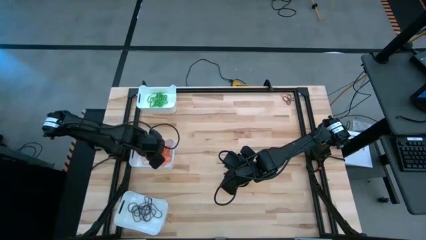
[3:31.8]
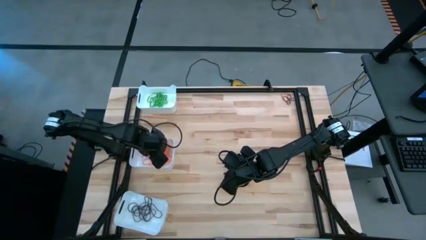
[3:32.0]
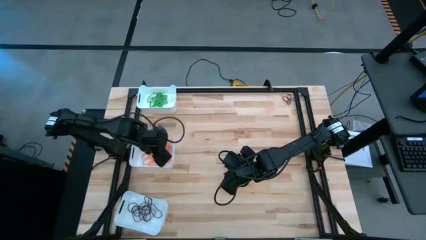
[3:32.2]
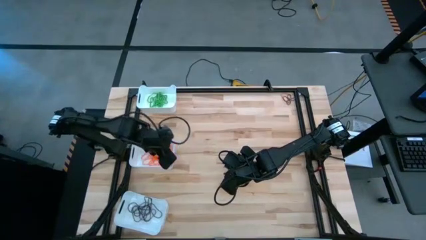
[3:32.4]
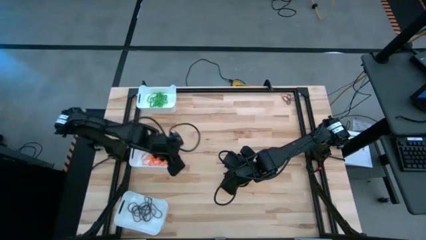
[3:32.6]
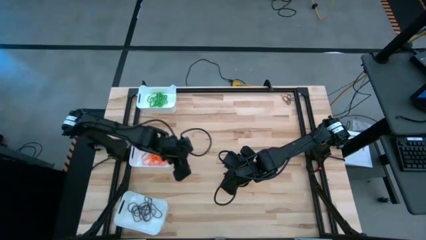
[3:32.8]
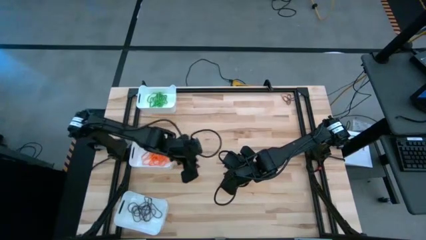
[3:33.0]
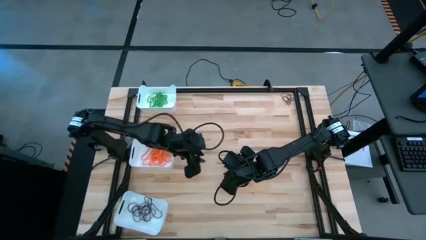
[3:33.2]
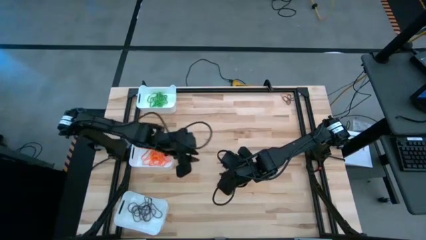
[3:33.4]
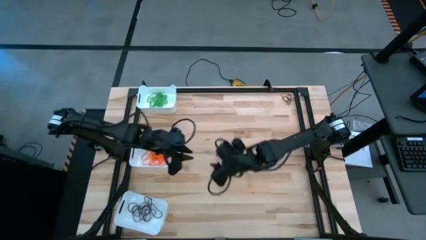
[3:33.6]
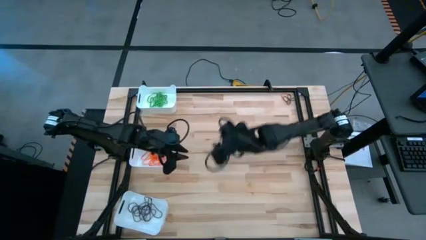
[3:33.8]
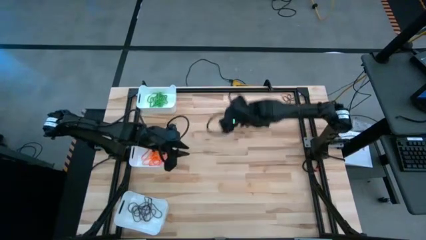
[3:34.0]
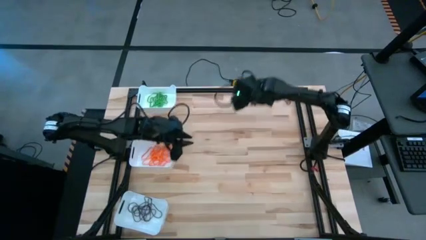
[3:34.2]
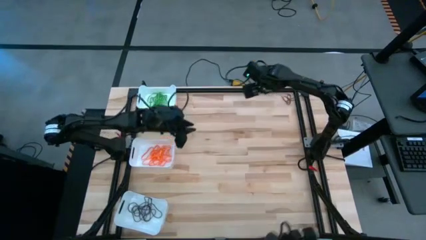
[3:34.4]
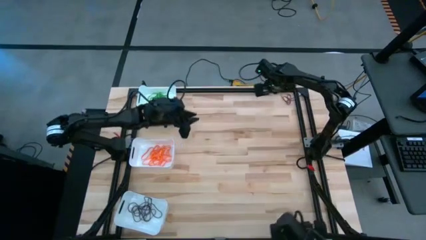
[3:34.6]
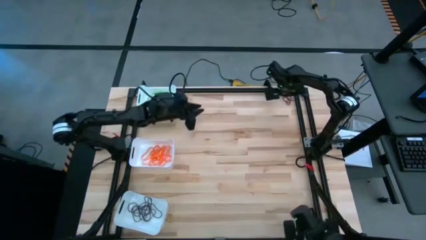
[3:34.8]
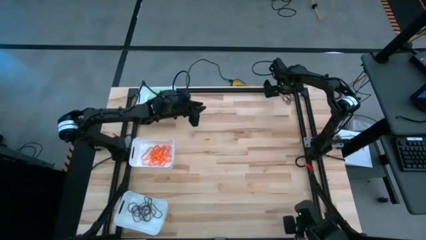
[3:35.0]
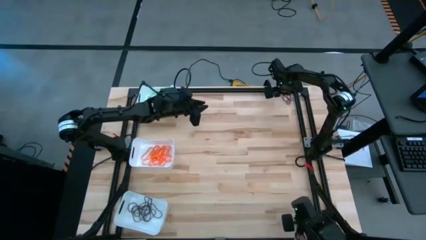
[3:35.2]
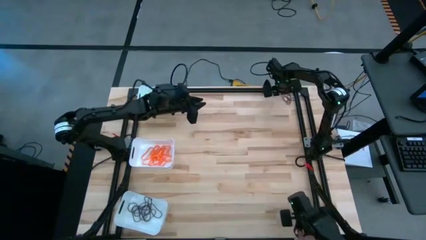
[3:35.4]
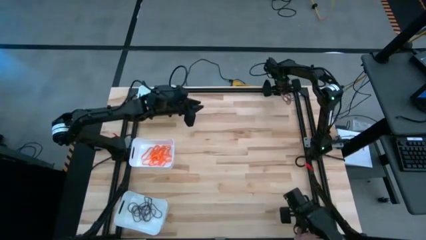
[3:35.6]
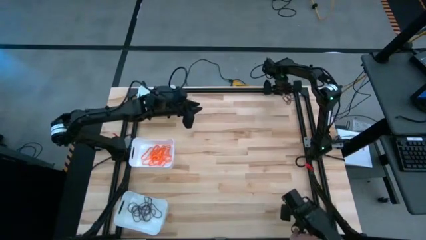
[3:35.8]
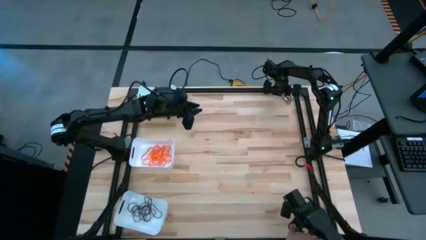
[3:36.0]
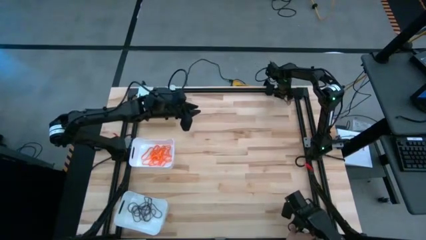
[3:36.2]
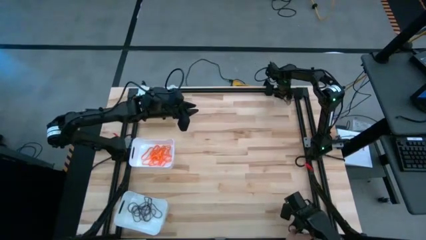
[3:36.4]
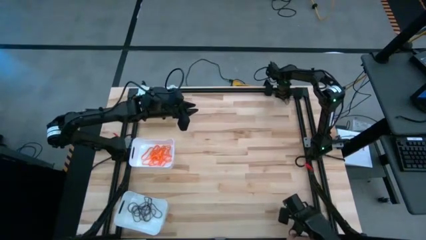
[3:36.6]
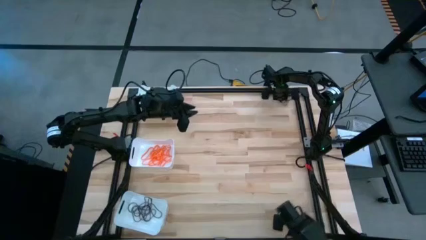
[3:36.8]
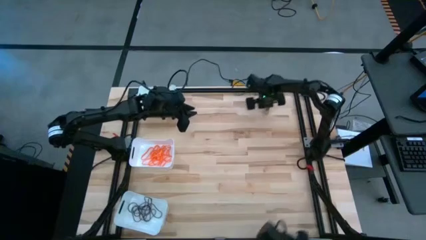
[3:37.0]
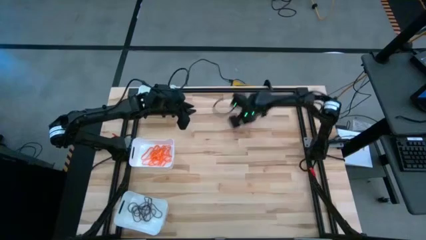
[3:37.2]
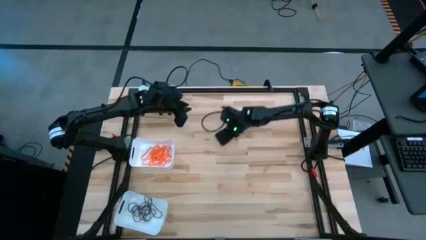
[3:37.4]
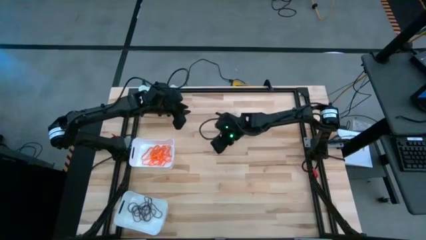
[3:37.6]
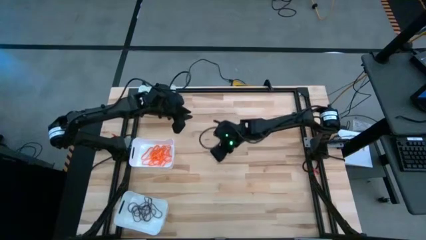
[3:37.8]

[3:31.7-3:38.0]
Task: Sort rubber bands into baskets
Put the orange rubber band into the middle white bin

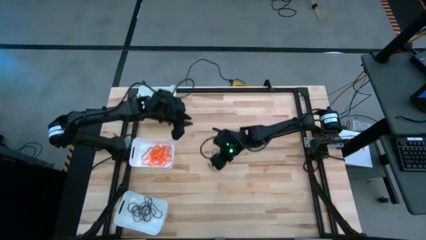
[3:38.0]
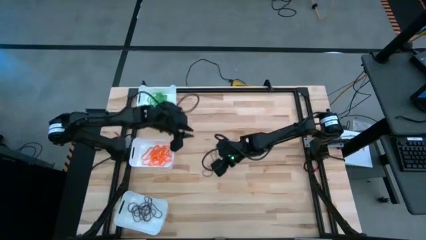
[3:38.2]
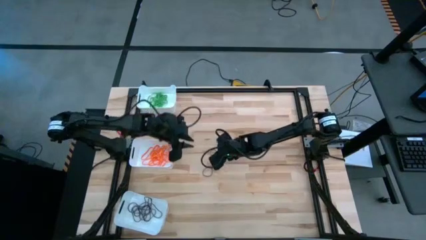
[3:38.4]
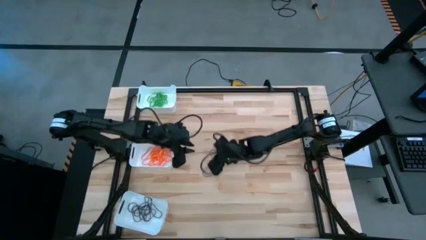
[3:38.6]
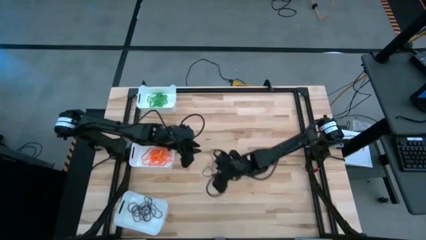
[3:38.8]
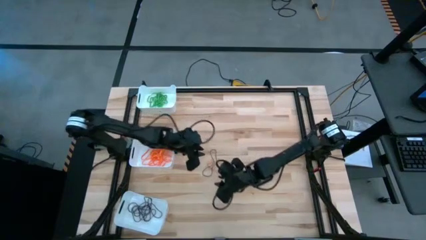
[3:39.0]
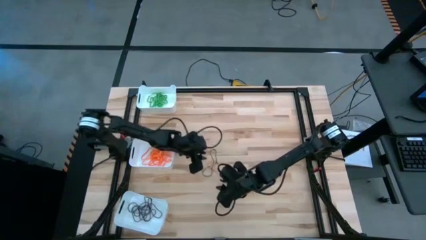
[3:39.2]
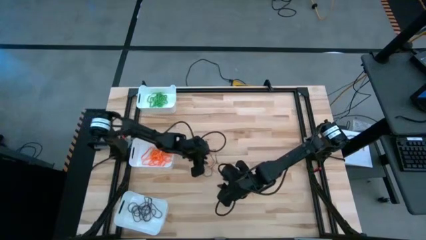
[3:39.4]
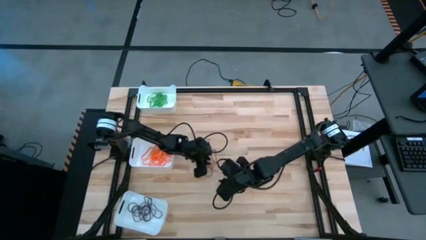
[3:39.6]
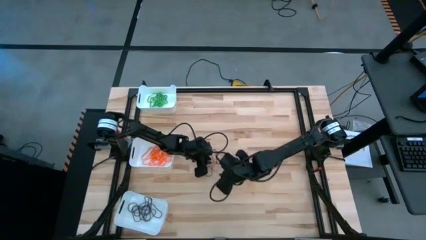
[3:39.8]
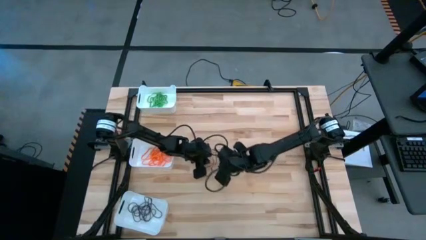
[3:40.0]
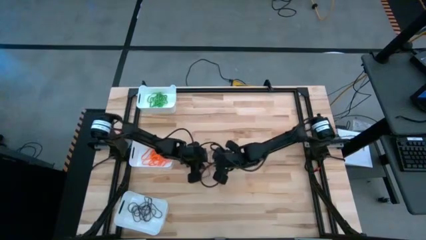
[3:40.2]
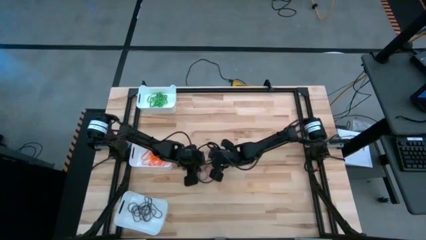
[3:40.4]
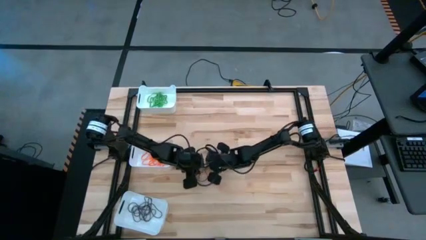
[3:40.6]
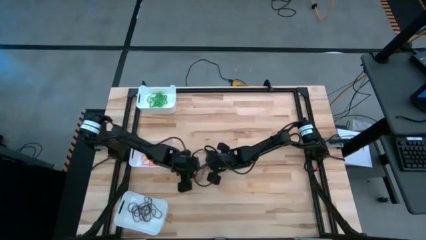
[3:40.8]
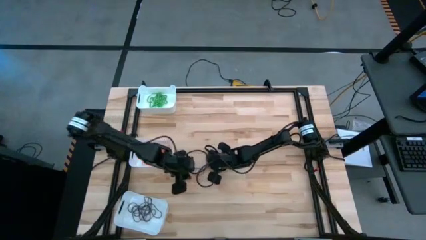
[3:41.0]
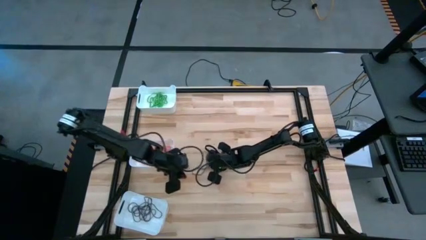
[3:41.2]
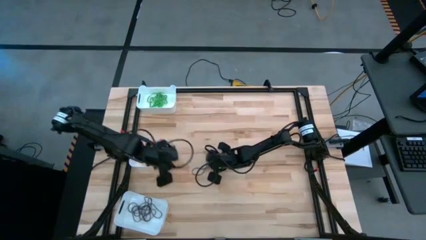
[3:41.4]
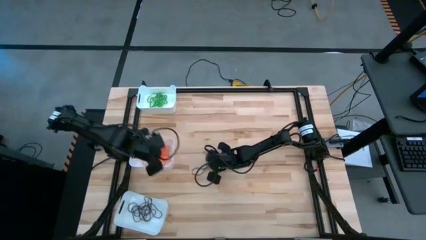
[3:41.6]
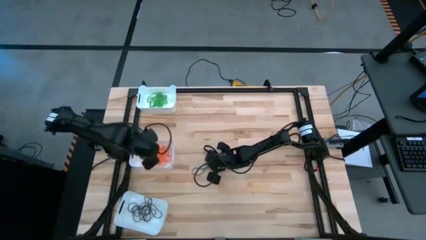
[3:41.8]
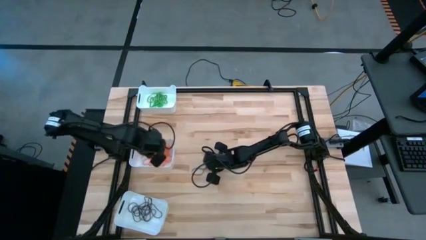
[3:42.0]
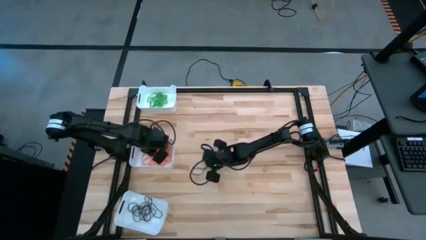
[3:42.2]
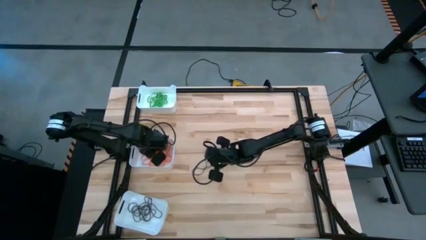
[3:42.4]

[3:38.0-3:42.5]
Put the orange rubber band into the middle white bin

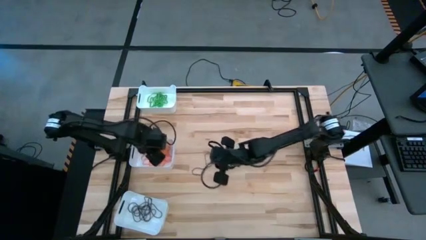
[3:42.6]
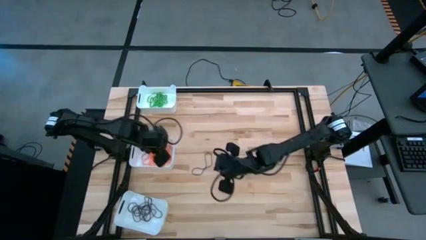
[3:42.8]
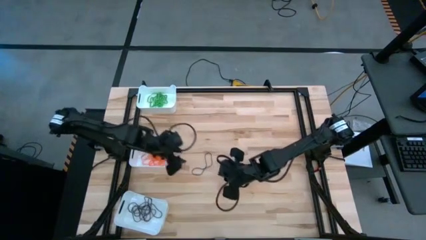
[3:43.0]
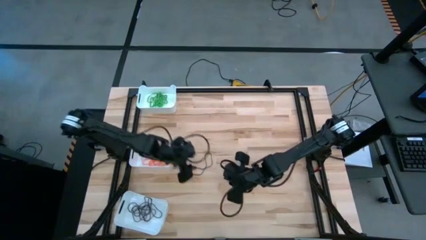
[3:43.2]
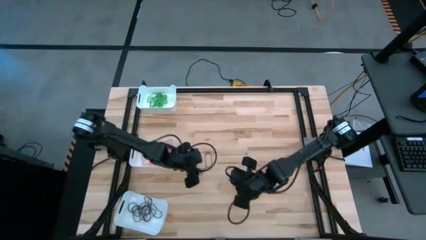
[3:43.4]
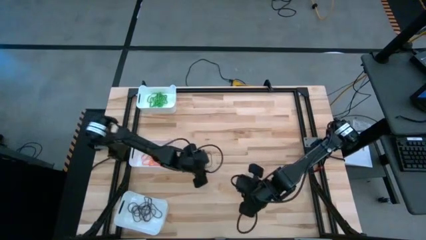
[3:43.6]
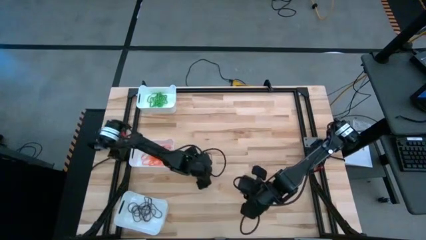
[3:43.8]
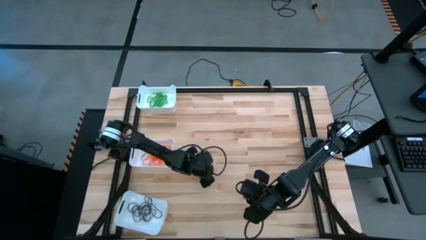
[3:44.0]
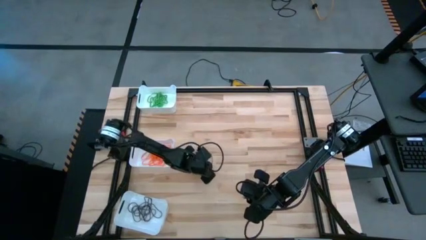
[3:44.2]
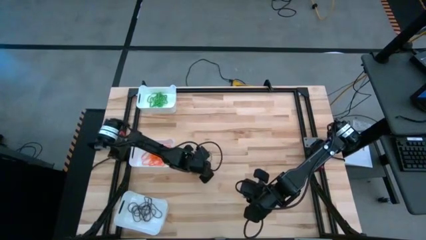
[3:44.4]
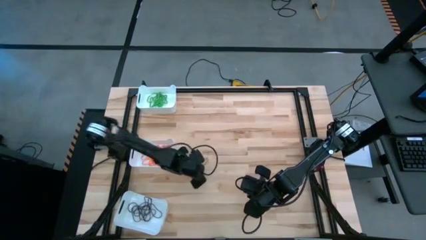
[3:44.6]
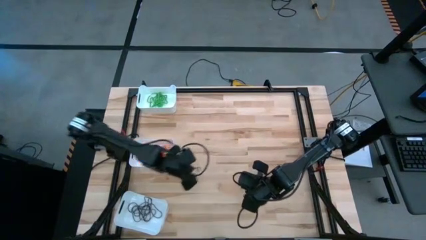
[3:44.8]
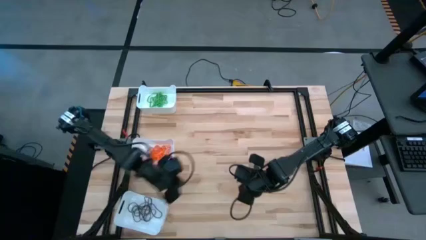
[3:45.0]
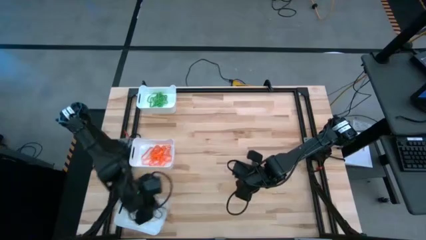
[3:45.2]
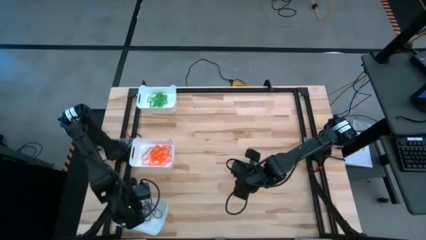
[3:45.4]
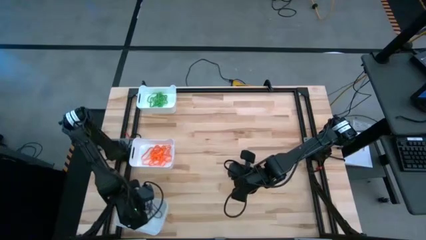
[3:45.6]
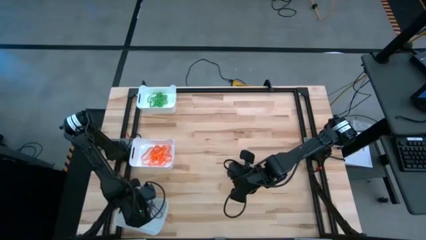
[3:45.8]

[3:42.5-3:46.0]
Put the black rubber band into the bottom white bin
